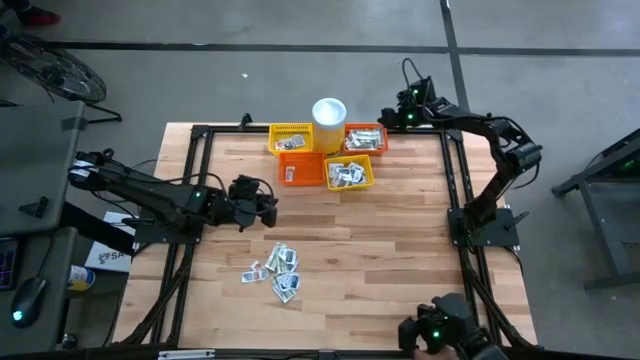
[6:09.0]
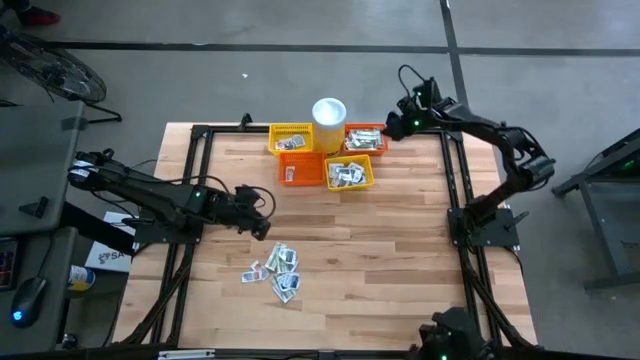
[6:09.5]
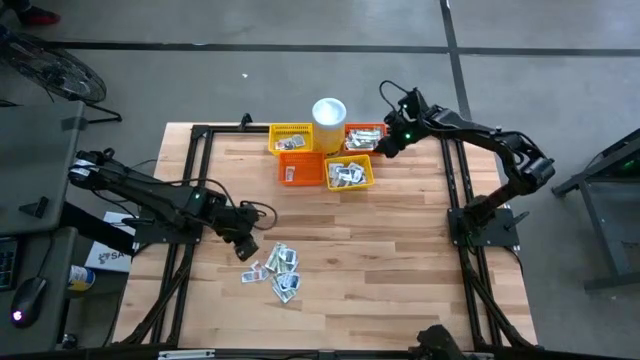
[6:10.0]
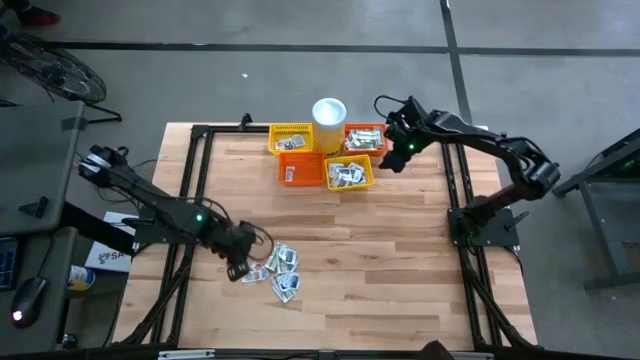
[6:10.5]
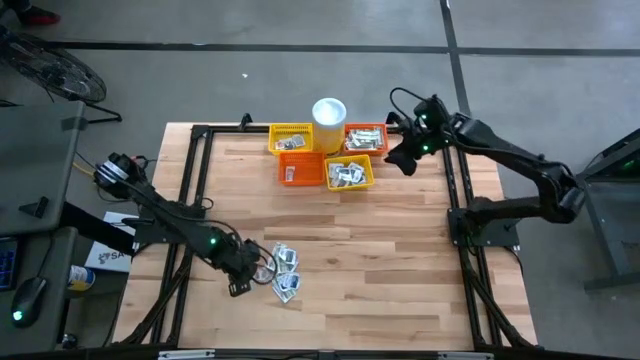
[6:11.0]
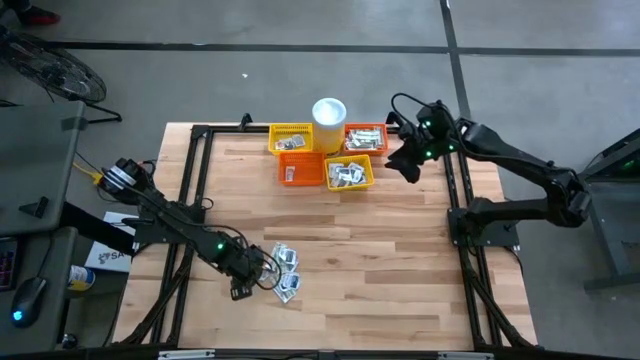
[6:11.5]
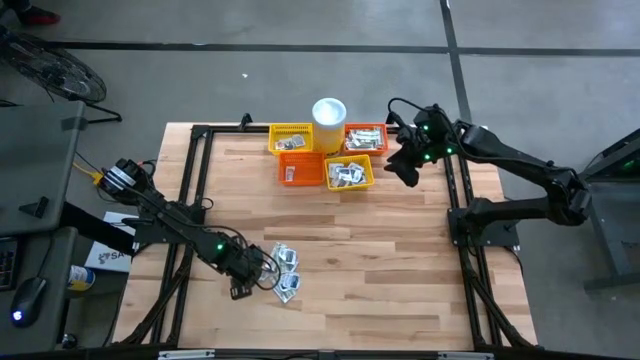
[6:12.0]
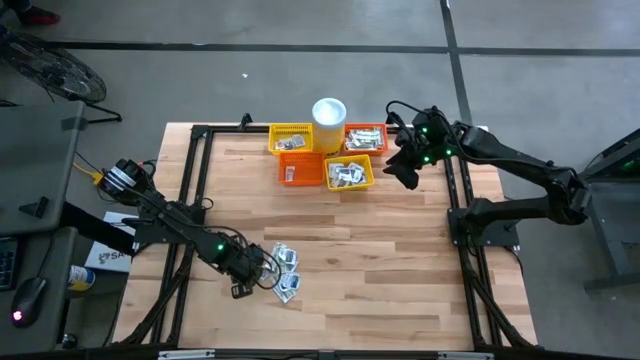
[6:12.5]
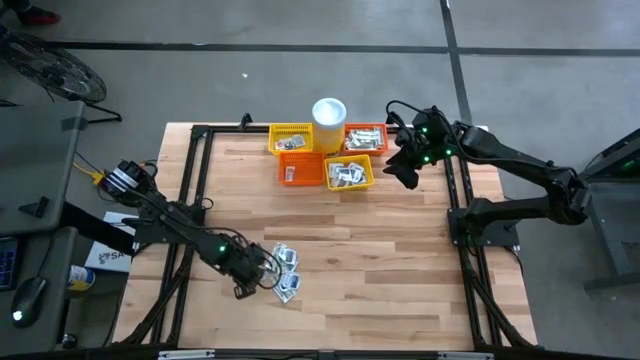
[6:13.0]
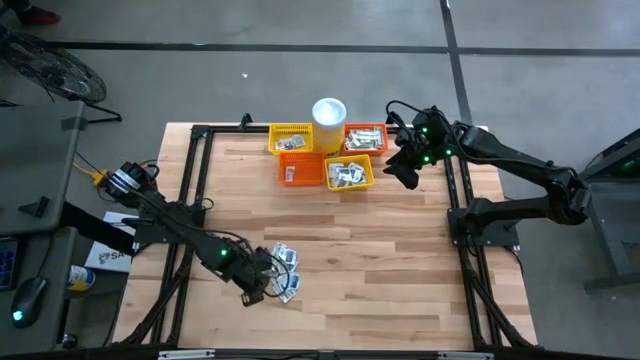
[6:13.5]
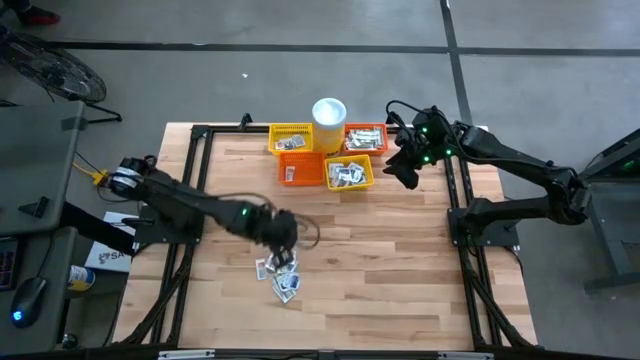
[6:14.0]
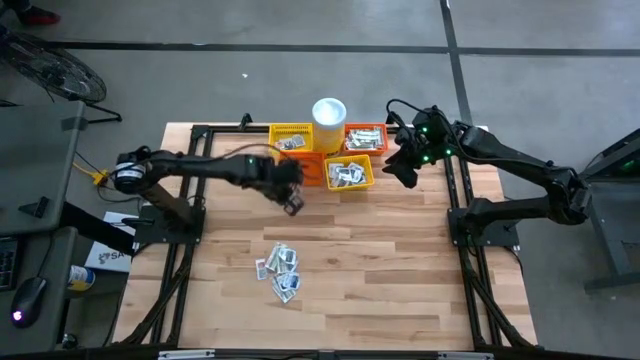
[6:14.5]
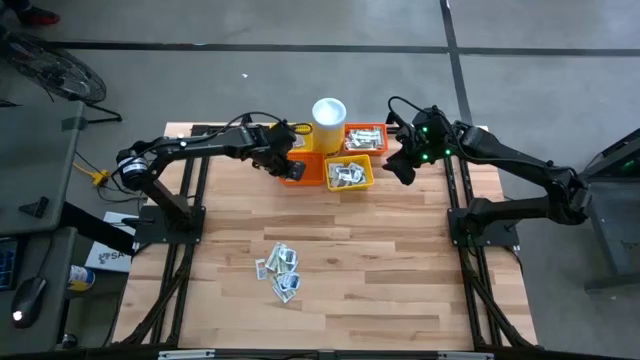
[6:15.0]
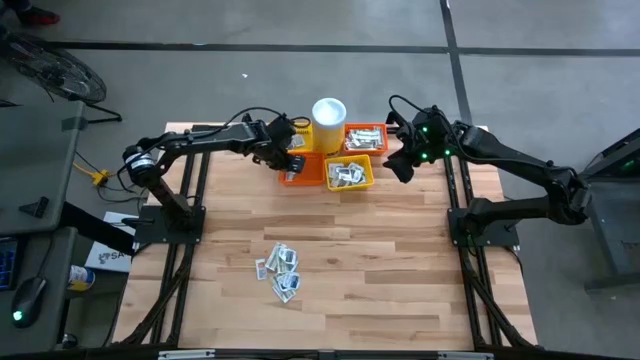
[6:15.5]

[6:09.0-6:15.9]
Task: Pick & Place First Aid Supplies
Put the orange ointment pack into the bottom orange basket

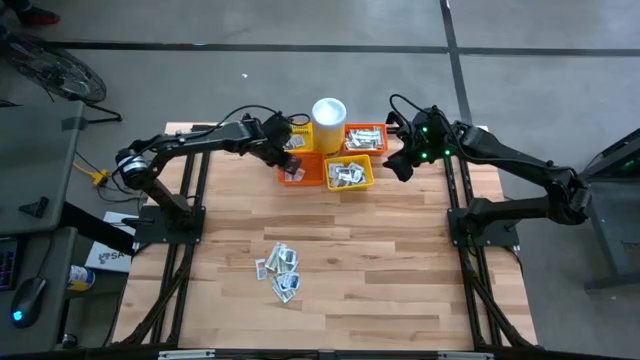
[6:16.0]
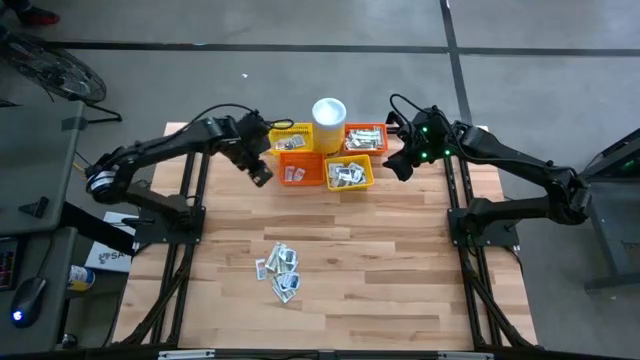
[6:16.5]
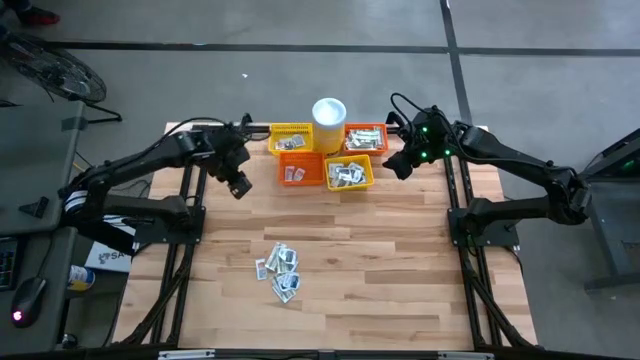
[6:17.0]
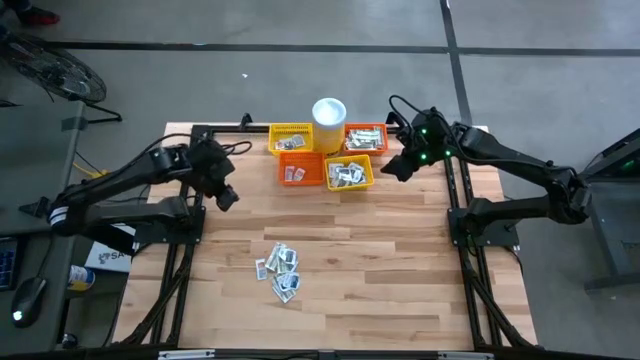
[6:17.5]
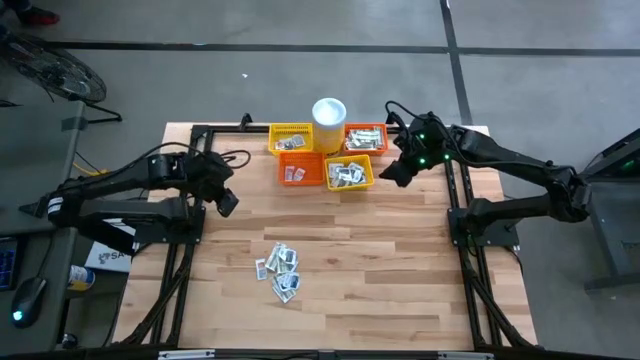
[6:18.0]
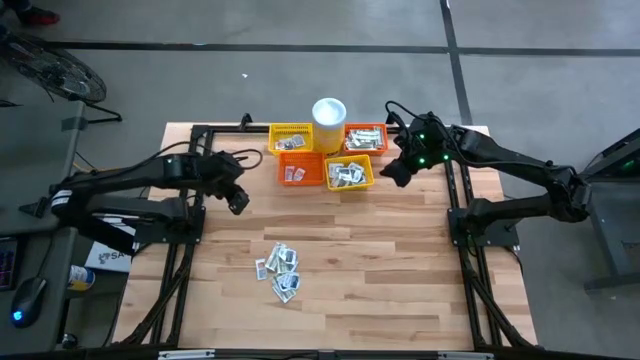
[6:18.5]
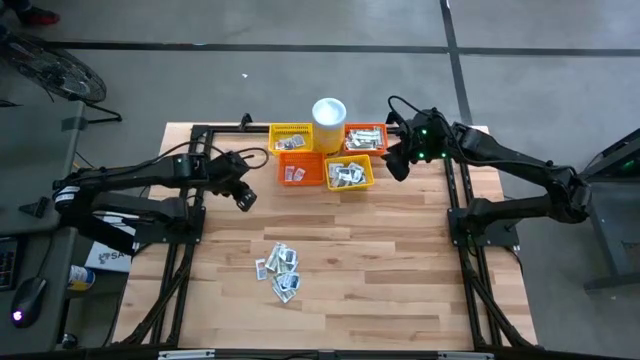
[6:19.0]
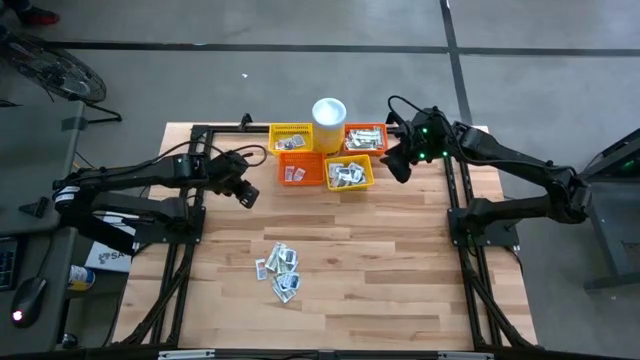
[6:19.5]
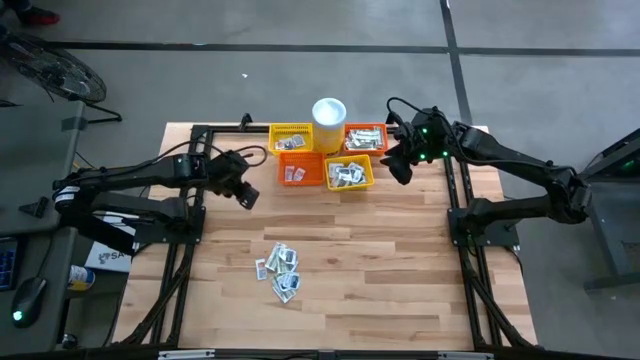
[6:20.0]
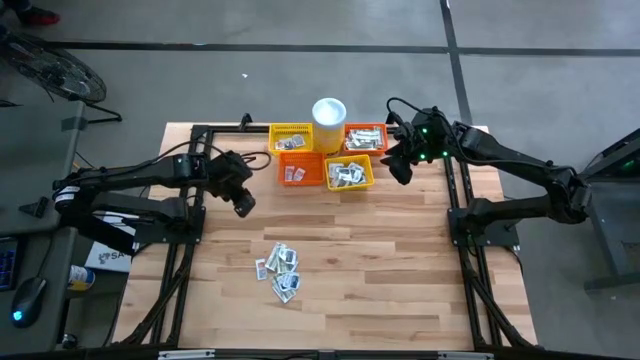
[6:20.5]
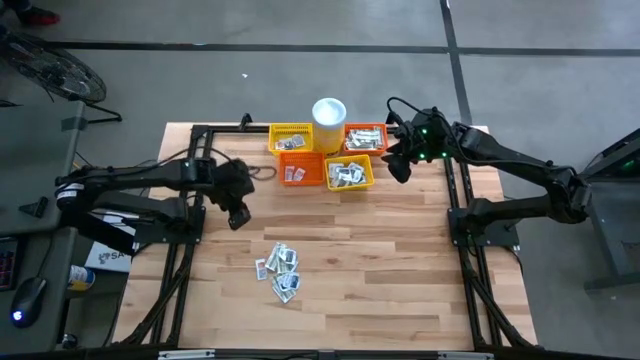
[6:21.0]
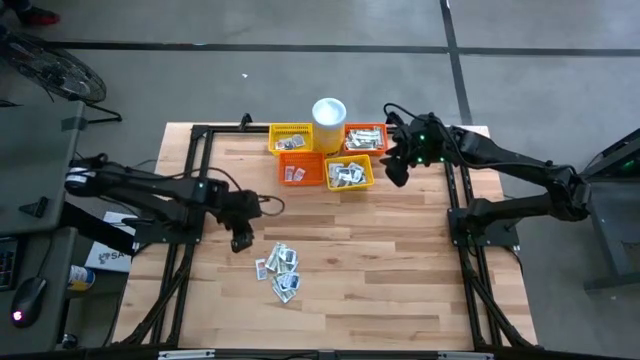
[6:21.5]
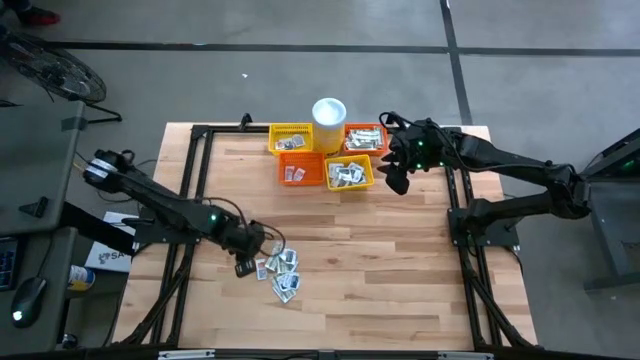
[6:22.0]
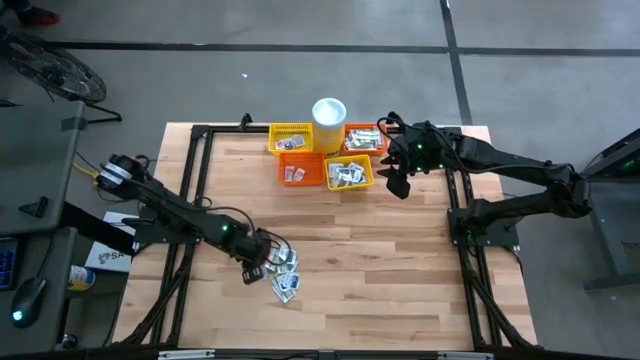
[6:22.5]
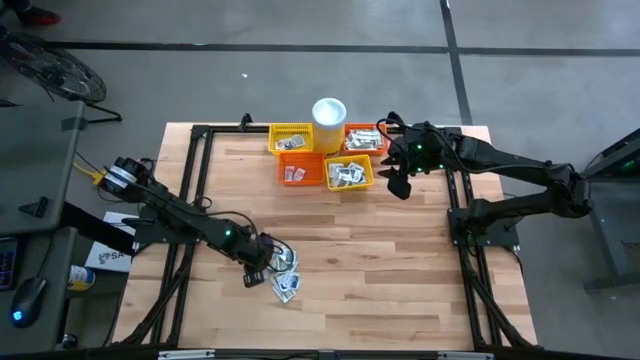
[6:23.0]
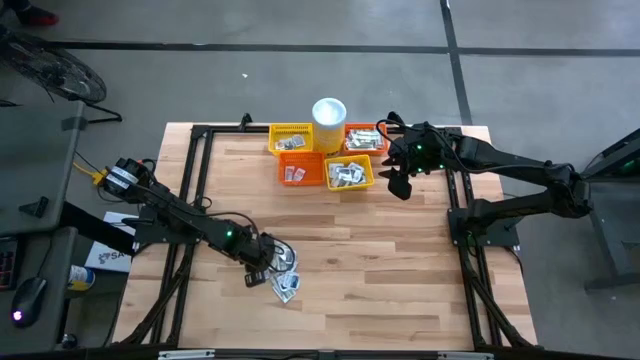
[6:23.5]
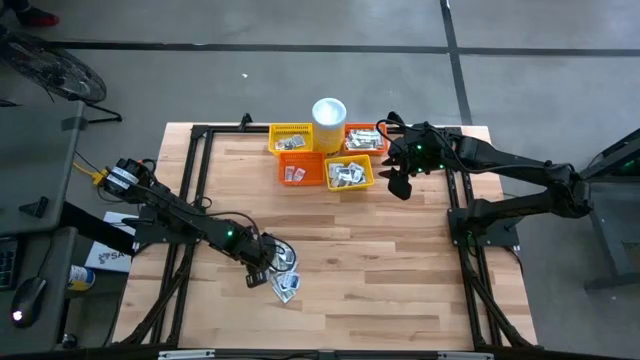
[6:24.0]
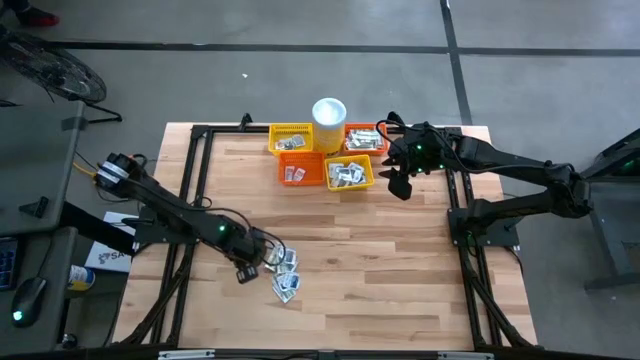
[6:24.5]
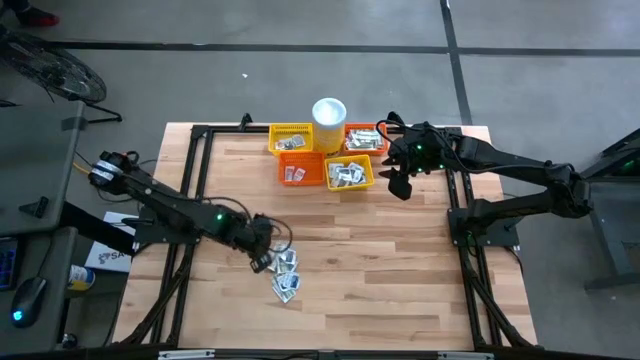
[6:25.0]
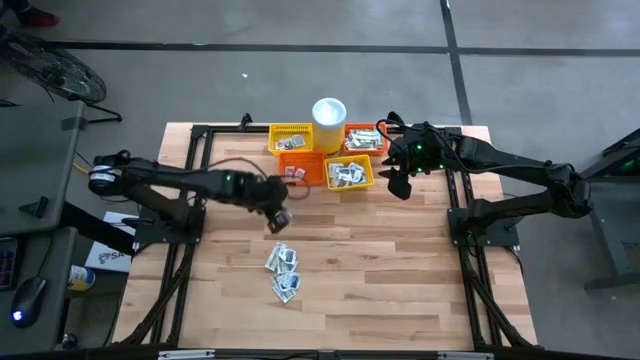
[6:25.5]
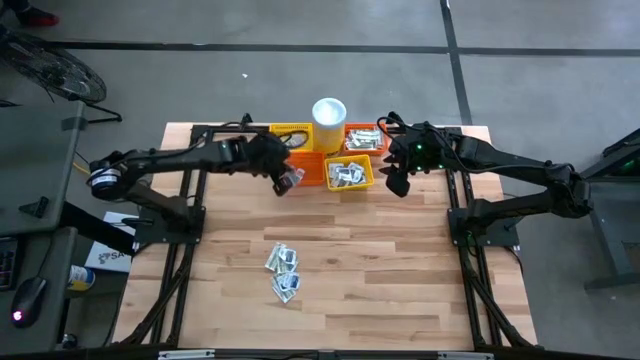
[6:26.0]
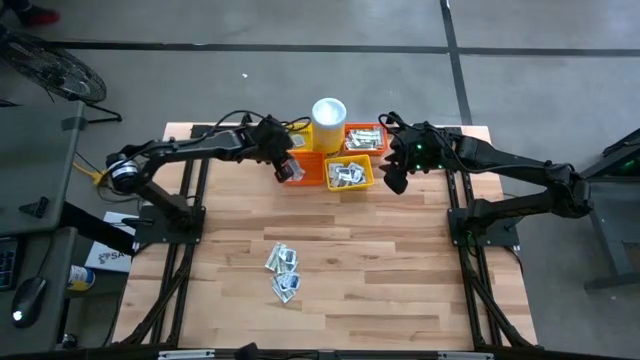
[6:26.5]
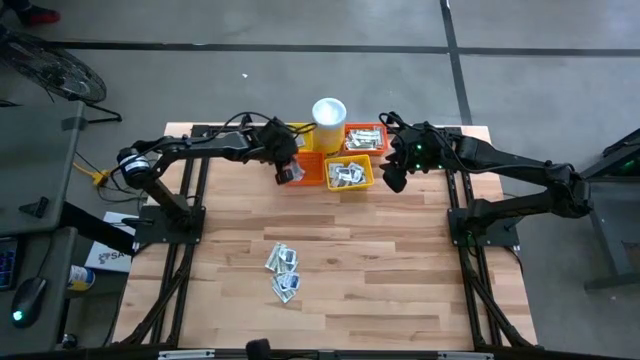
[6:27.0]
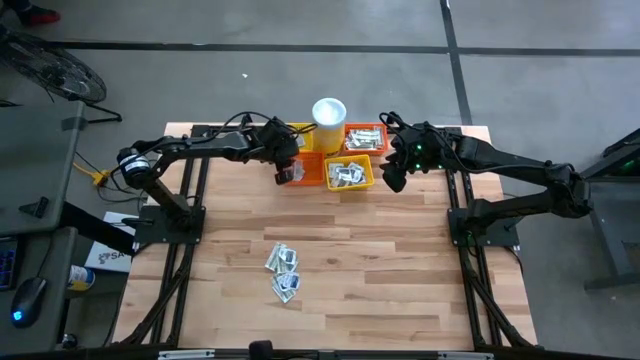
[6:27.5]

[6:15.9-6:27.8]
Put the orange ointment pack into the bottom orange basket
